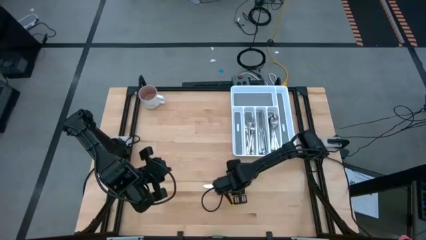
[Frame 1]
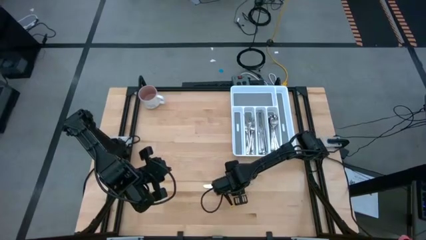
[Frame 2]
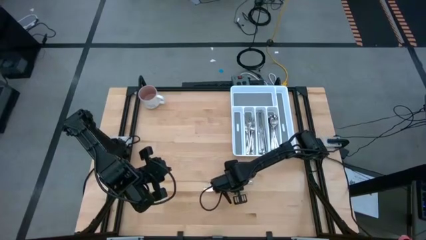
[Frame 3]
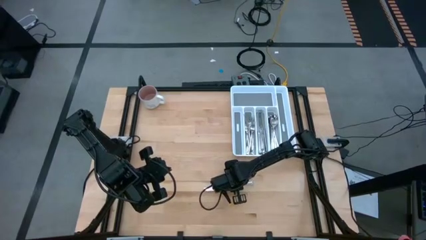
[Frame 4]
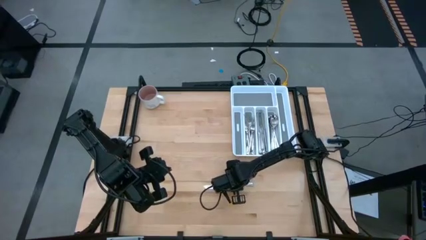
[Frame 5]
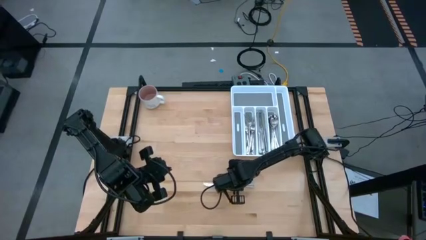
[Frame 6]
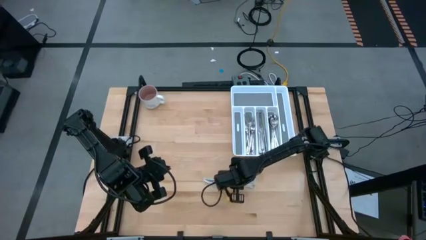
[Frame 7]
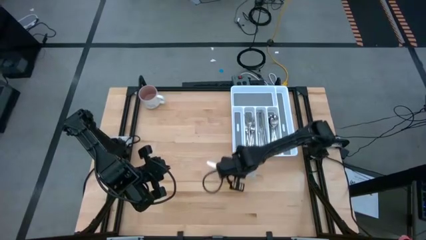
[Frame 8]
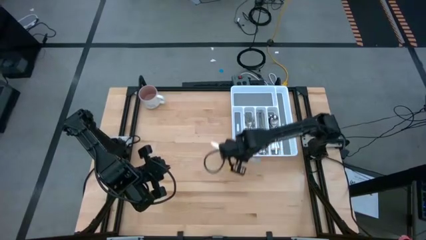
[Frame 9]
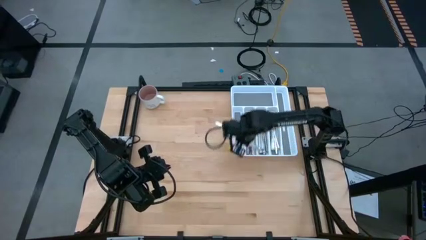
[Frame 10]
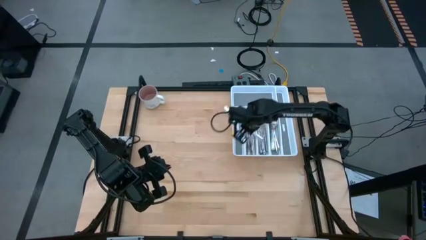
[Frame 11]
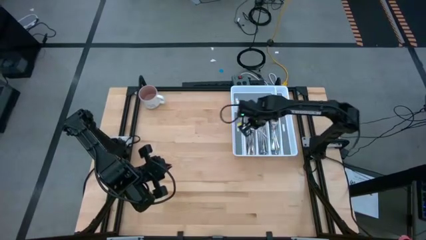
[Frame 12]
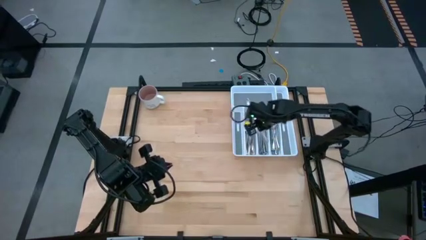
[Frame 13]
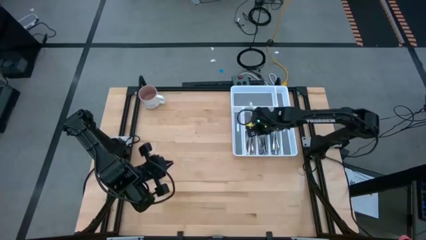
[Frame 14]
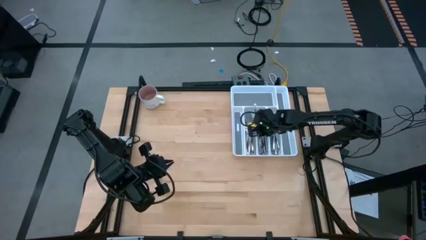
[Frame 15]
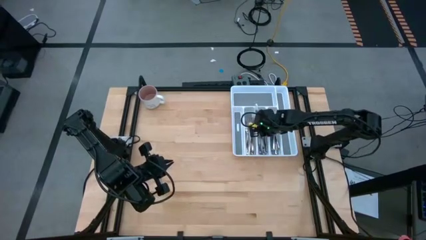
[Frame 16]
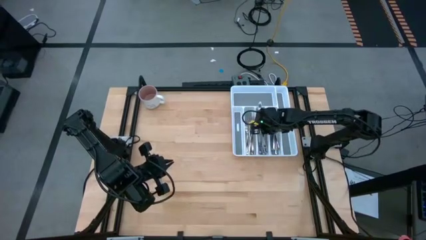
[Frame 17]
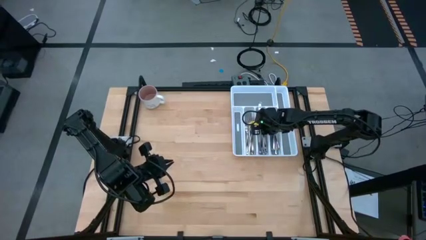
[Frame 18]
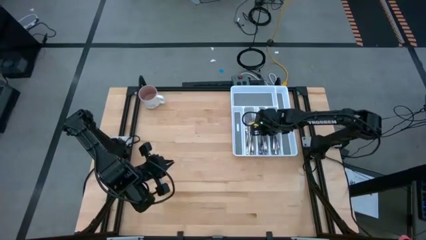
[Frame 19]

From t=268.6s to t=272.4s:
Task: Sort silverware
Put the silver table knife into the silverware tray

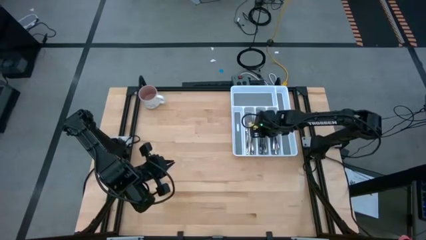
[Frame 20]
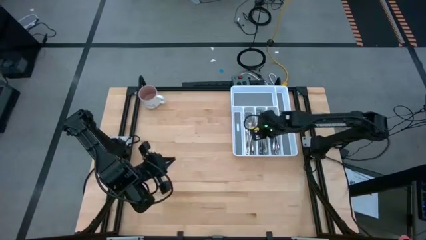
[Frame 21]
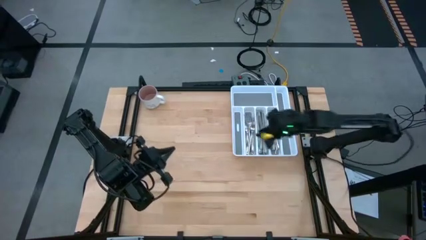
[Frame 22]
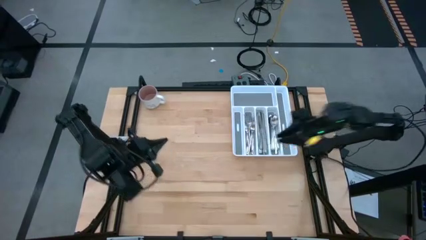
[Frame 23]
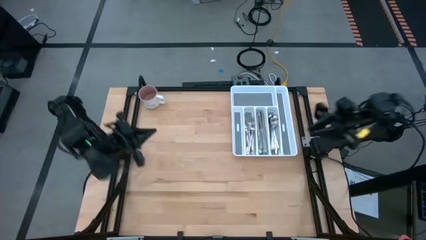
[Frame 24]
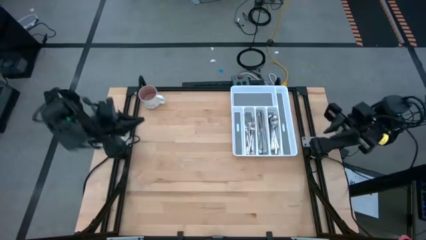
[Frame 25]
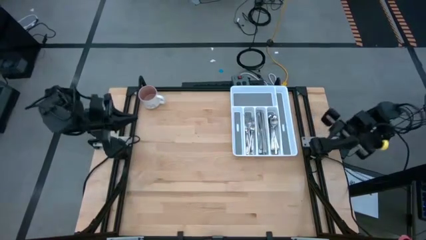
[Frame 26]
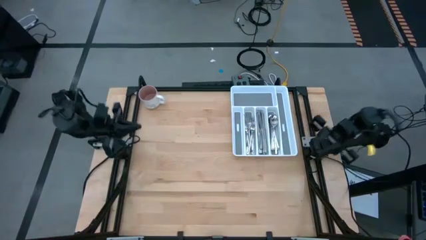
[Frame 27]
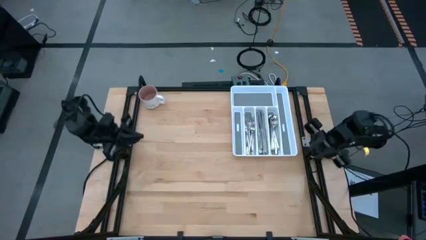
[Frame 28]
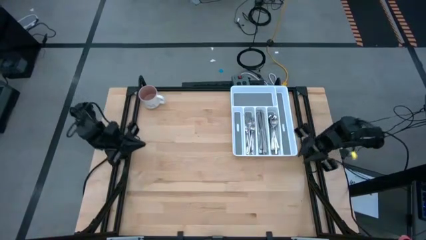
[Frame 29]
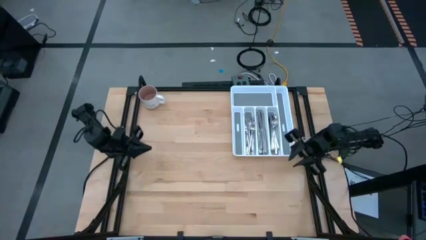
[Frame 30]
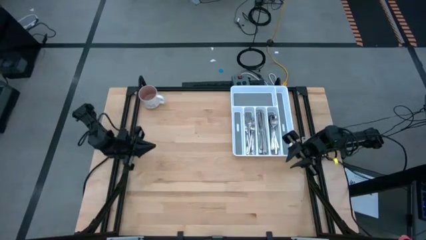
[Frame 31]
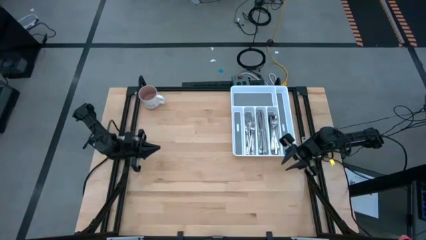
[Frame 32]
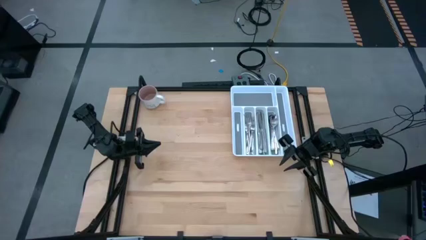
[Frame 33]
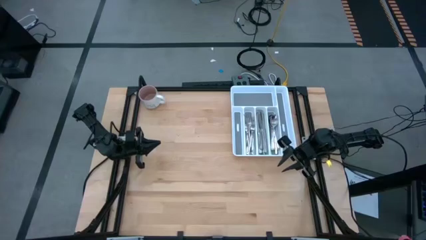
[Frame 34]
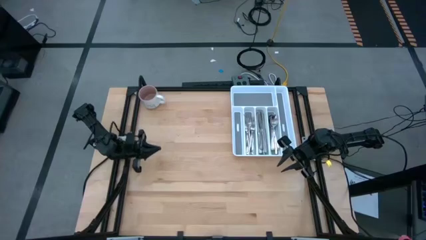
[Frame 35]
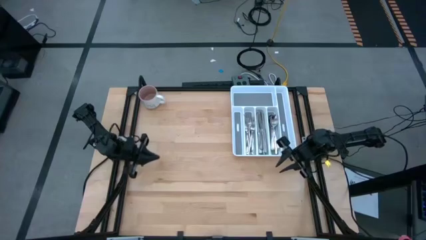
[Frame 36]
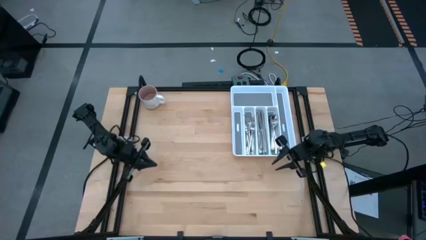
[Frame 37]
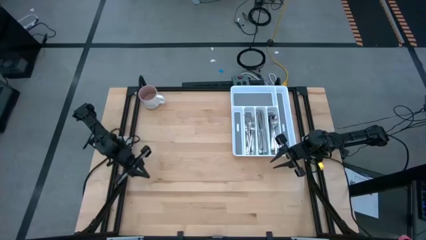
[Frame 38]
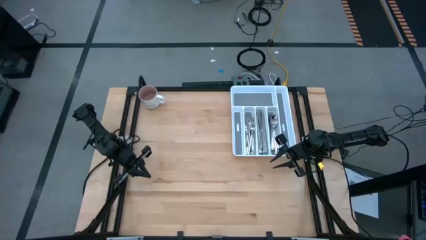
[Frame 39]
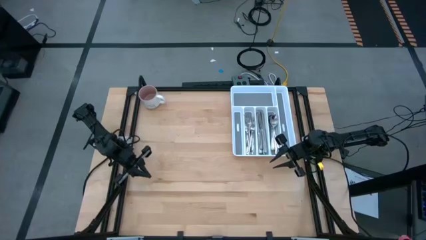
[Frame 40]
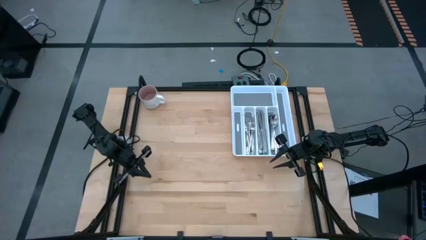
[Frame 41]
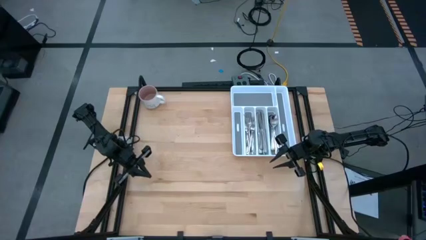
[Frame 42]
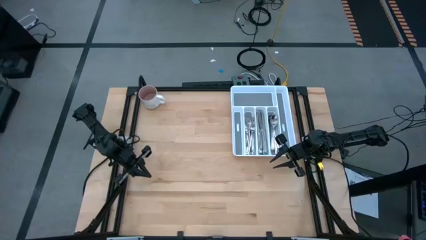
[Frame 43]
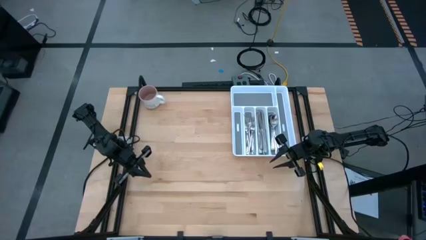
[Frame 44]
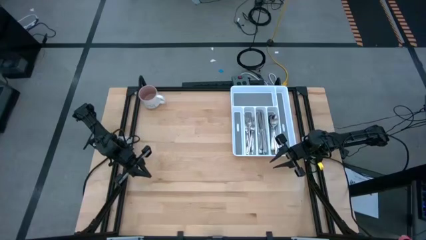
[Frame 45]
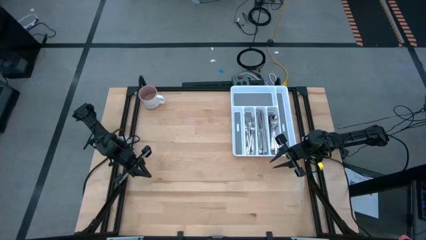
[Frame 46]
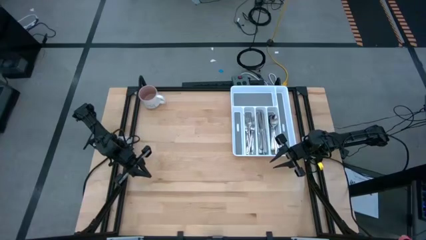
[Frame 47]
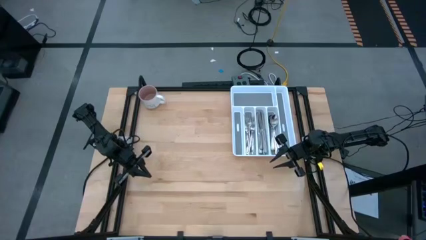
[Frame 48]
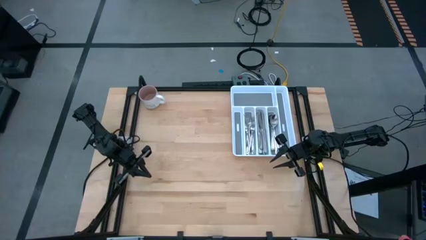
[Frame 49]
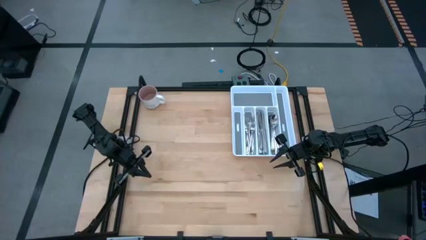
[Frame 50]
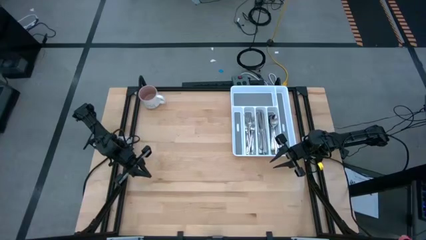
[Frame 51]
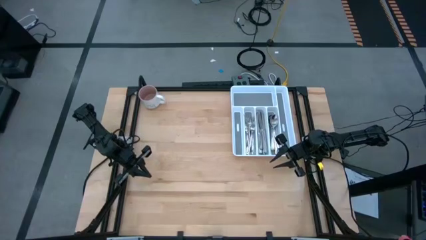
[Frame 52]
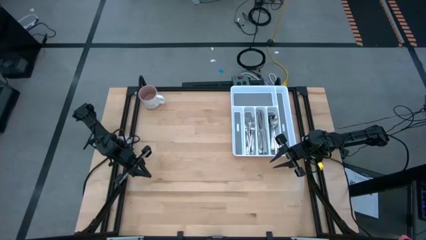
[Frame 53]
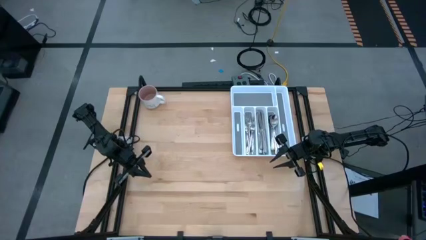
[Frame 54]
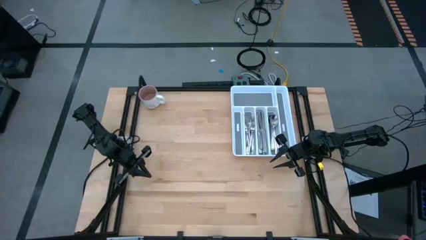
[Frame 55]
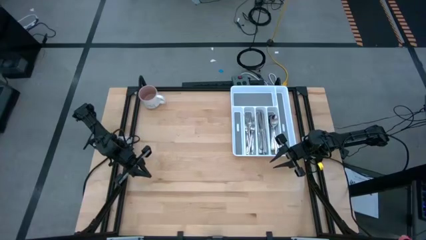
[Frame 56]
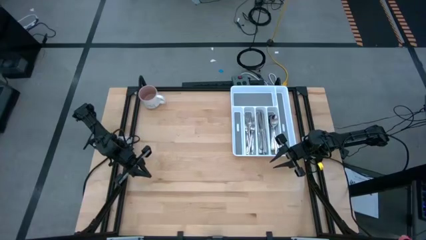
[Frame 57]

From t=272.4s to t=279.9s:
Return to Home Position

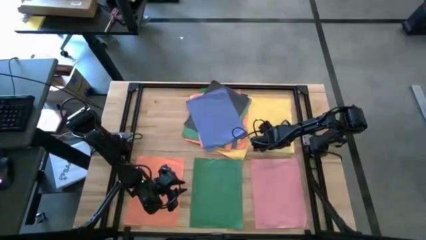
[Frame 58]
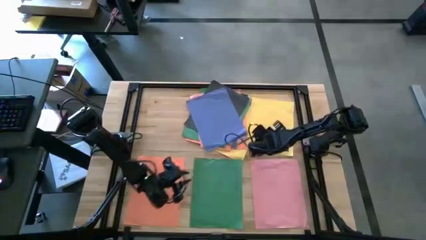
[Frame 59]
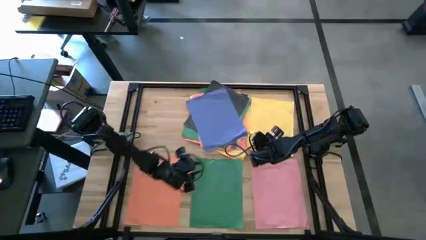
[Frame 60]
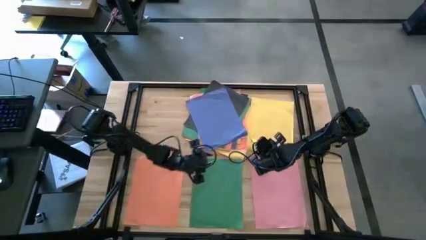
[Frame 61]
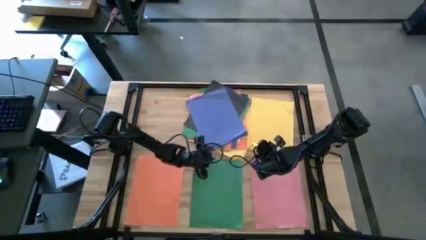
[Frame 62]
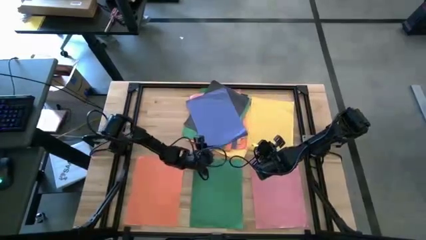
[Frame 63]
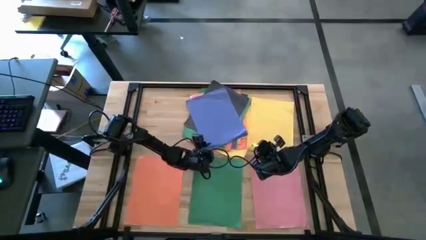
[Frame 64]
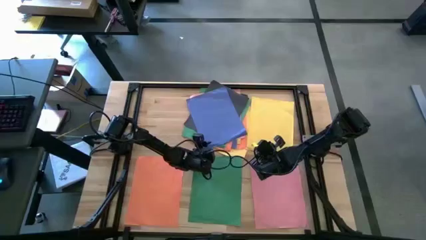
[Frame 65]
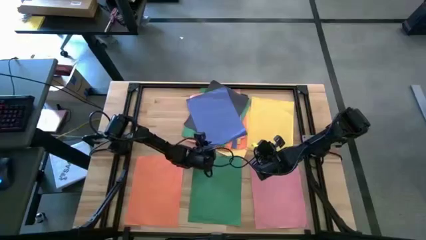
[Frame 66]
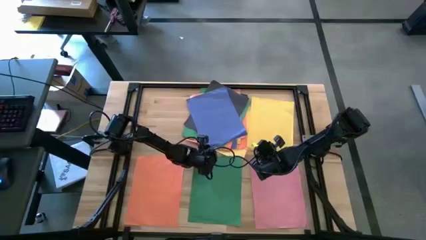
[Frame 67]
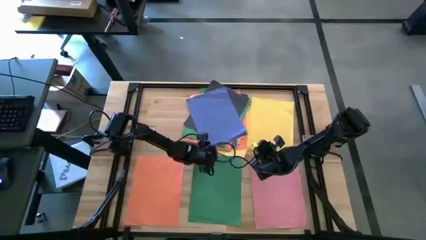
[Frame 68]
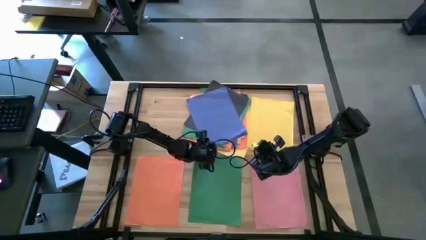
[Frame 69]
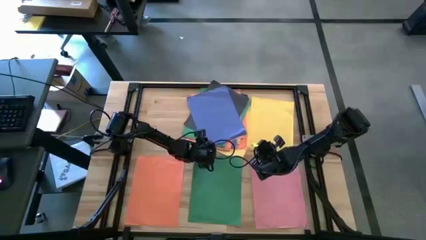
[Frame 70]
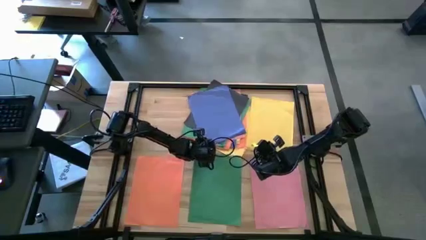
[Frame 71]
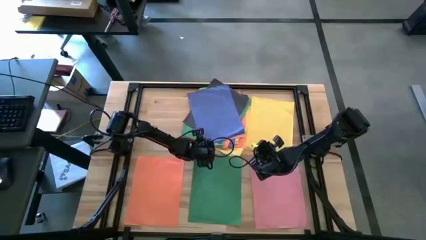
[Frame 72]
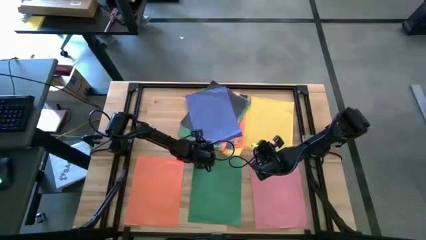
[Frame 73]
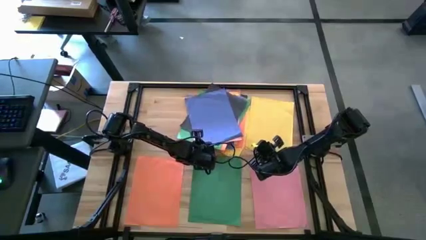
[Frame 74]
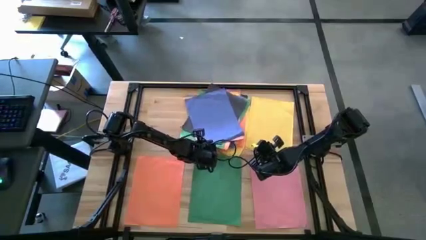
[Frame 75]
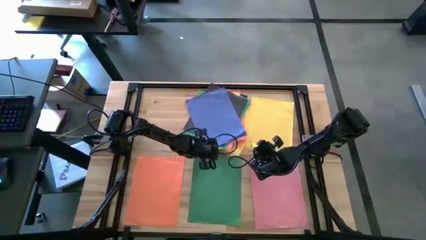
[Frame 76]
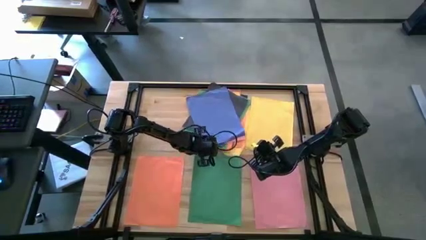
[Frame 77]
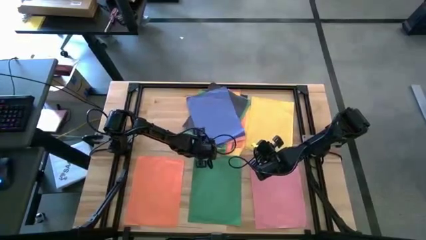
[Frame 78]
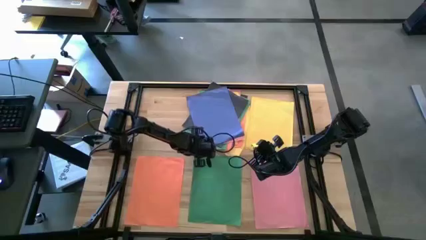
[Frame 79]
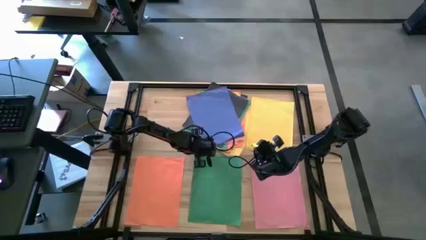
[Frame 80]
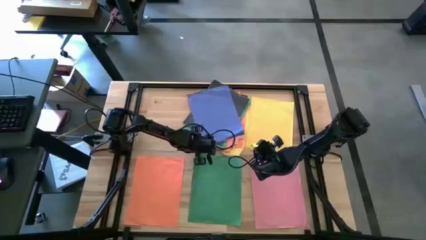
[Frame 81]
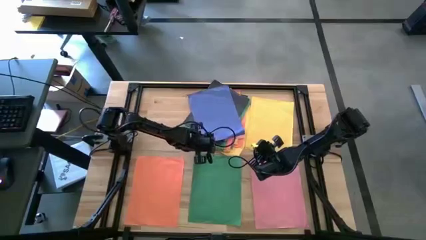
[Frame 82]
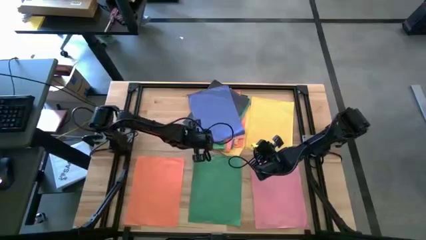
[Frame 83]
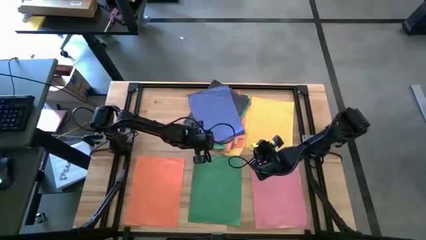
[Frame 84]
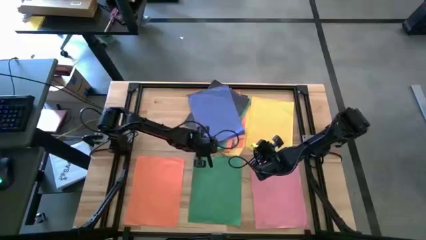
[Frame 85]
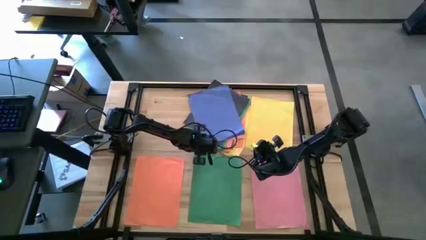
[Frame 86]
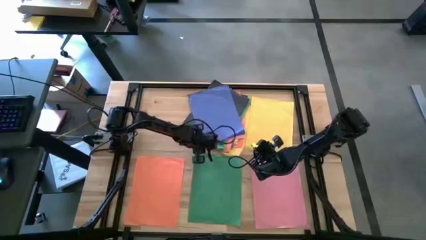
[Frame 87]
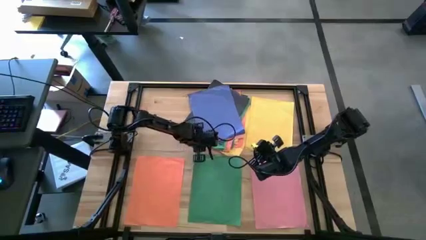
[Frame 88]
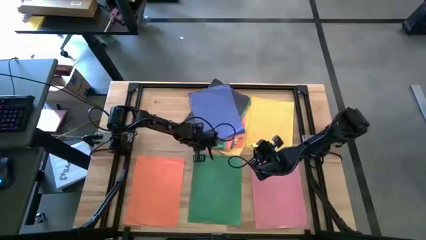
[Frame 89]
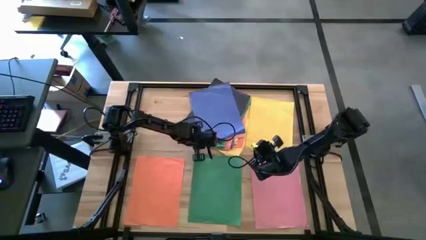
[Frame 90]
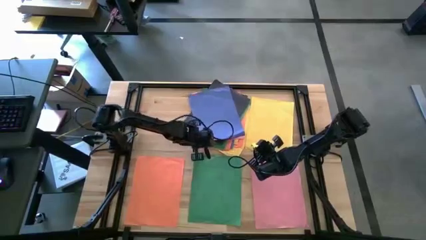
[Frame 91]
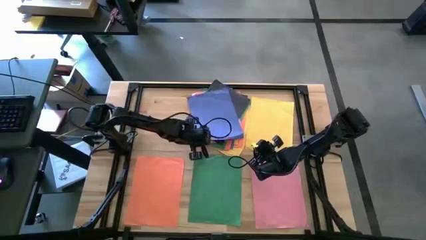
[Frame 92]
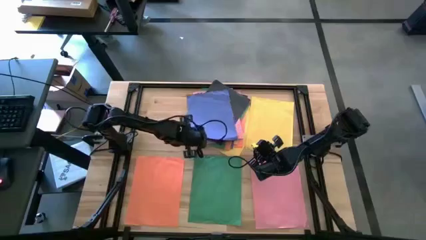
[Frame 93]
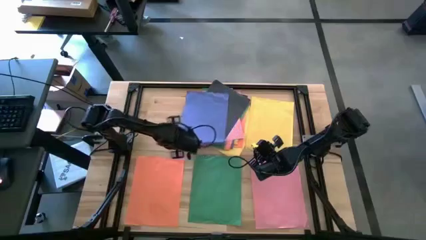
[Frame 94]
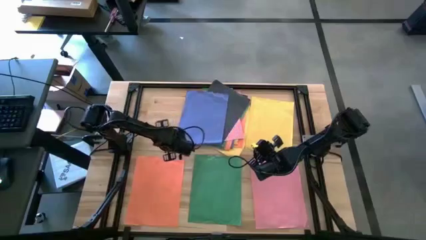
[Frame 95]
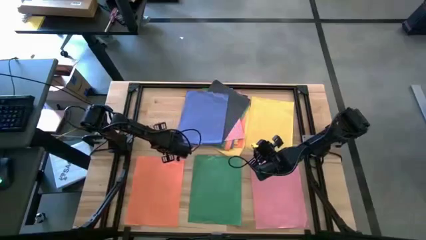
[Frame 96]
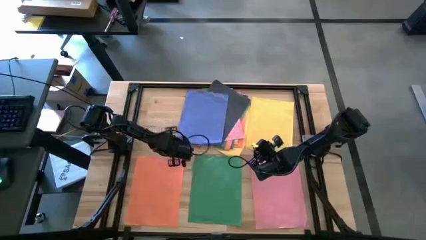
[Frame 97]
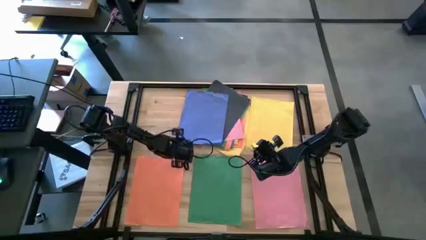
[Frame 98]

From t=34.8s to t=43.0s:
Task: Organize paper
Move the blue paper to the upper left of the table
